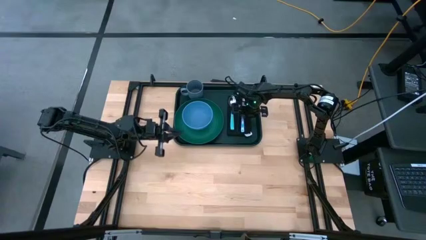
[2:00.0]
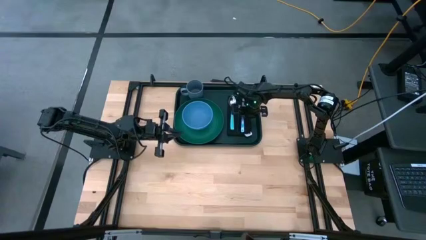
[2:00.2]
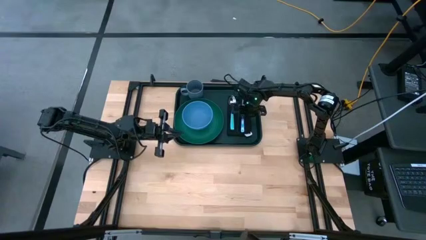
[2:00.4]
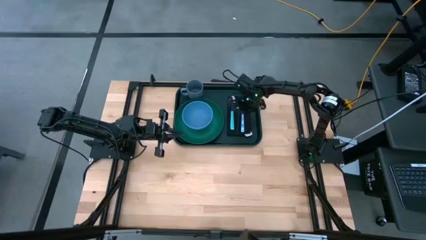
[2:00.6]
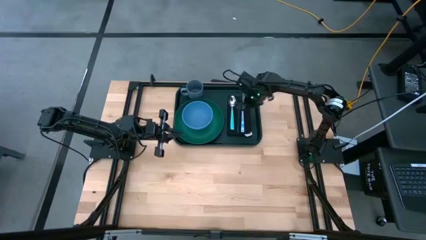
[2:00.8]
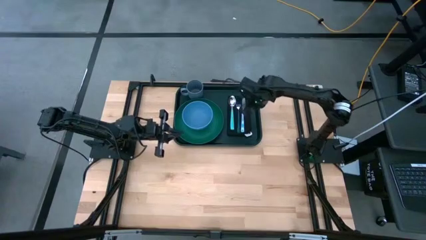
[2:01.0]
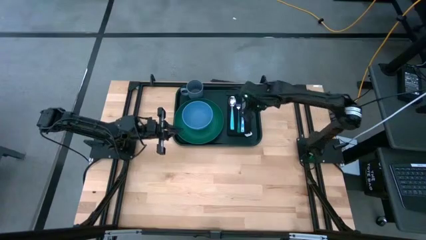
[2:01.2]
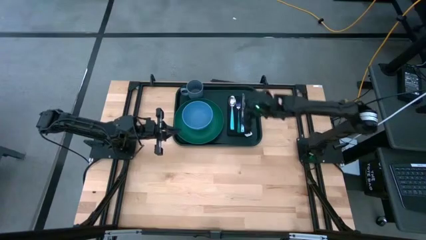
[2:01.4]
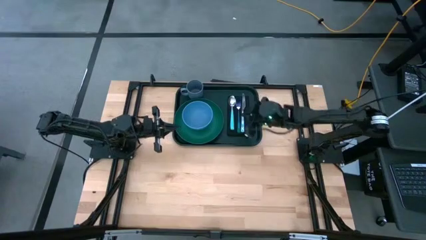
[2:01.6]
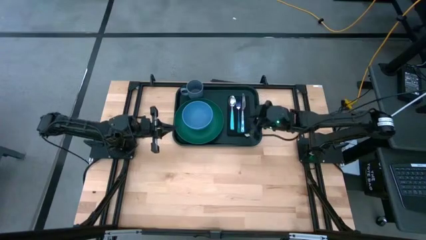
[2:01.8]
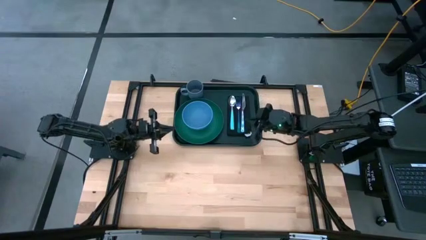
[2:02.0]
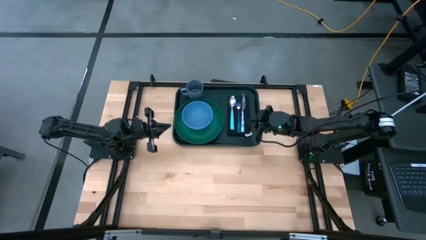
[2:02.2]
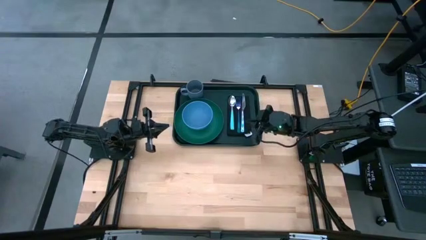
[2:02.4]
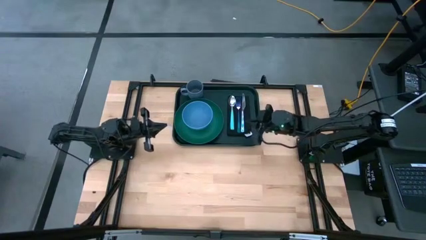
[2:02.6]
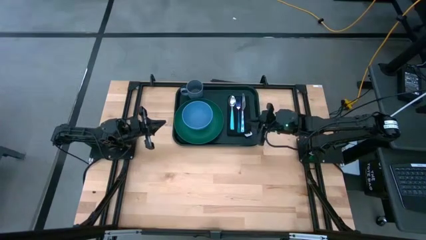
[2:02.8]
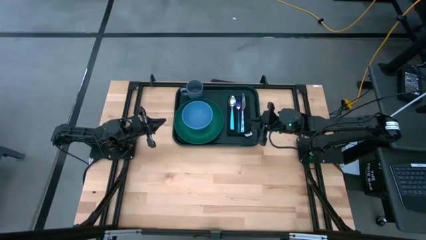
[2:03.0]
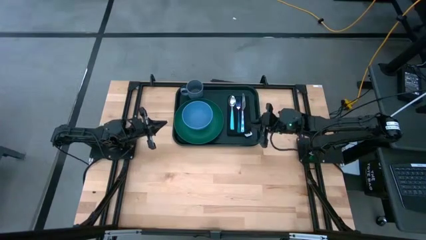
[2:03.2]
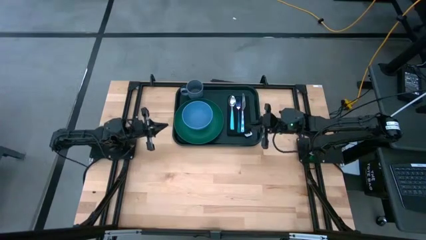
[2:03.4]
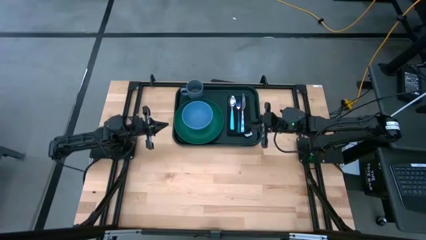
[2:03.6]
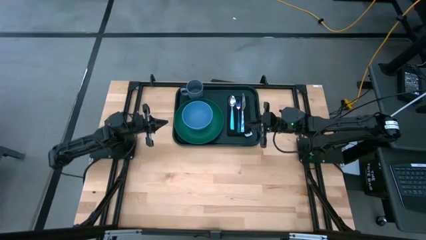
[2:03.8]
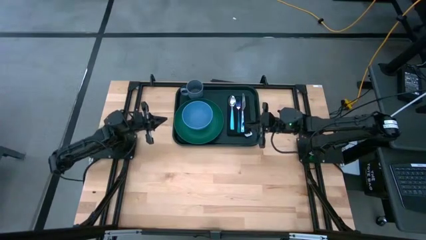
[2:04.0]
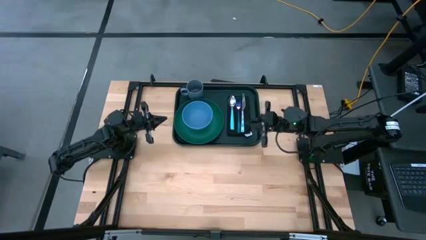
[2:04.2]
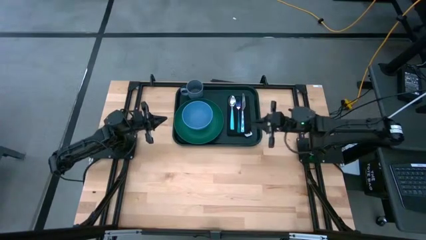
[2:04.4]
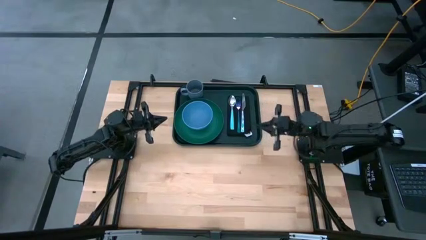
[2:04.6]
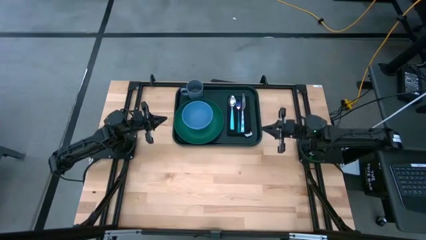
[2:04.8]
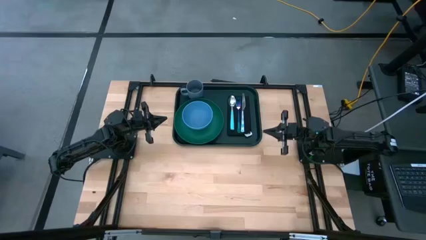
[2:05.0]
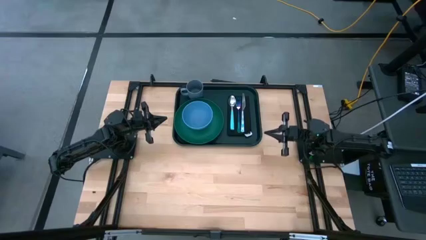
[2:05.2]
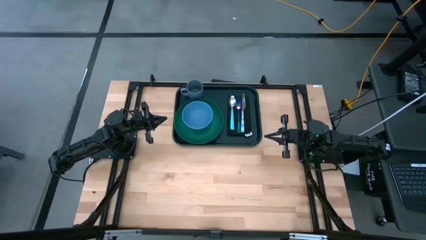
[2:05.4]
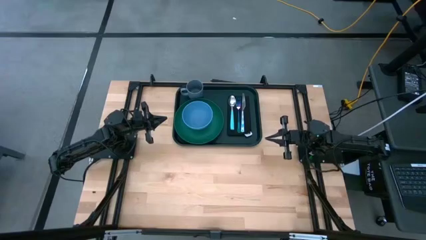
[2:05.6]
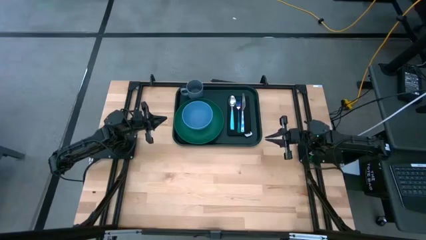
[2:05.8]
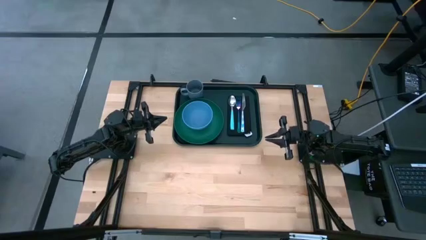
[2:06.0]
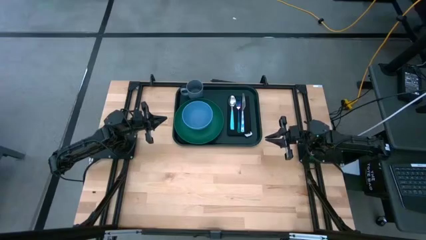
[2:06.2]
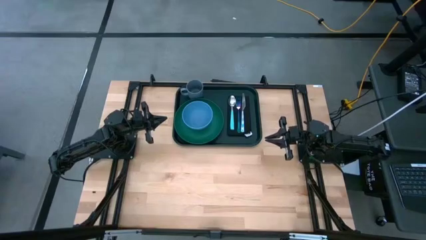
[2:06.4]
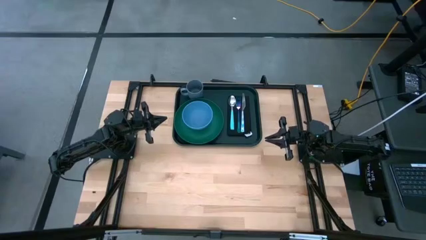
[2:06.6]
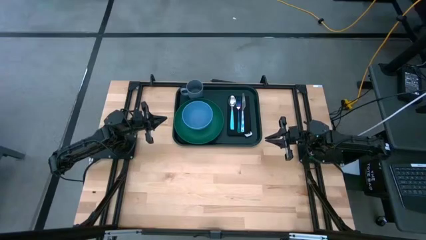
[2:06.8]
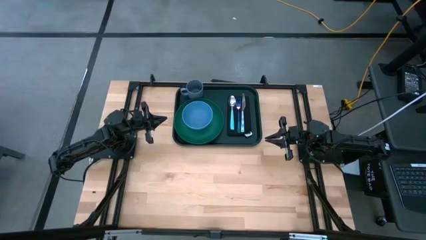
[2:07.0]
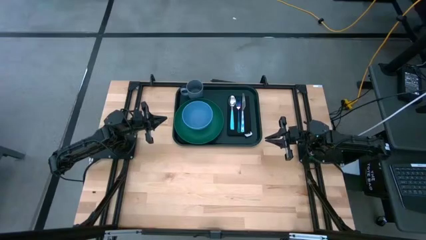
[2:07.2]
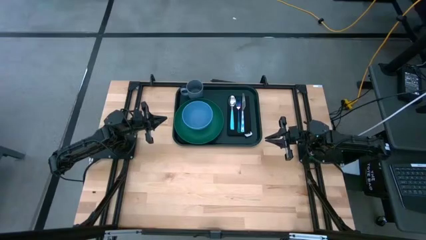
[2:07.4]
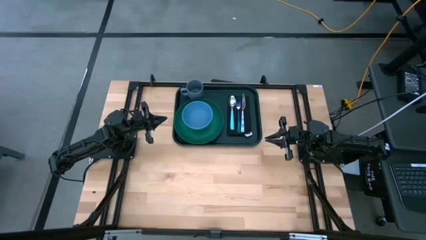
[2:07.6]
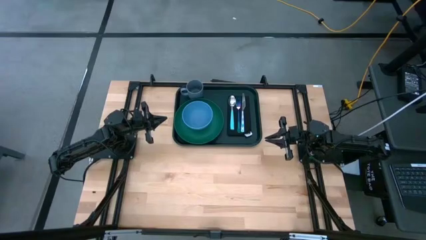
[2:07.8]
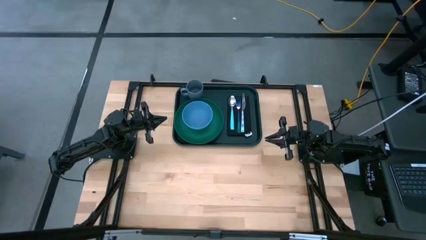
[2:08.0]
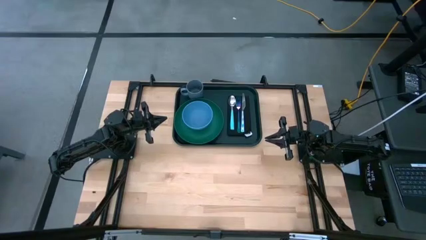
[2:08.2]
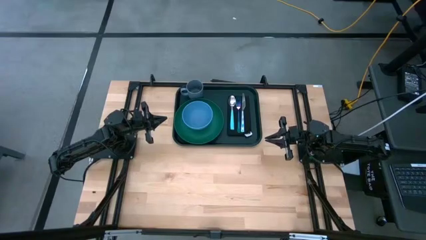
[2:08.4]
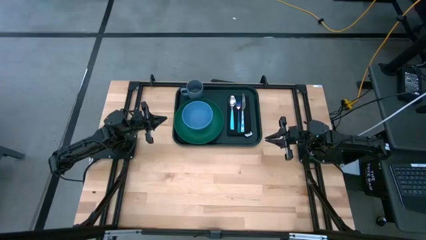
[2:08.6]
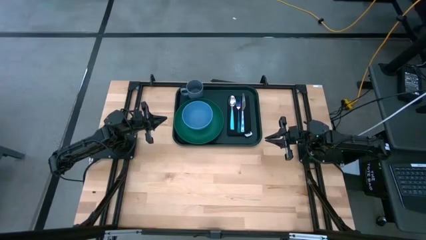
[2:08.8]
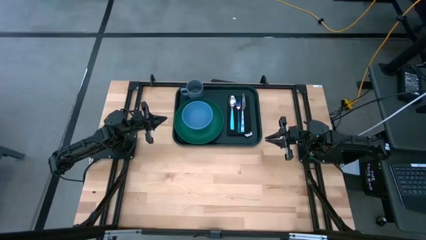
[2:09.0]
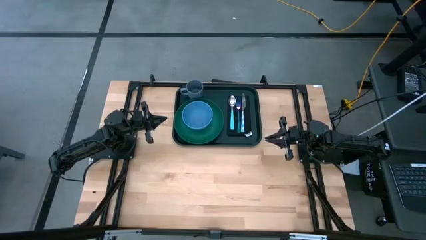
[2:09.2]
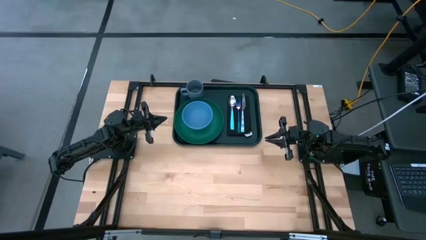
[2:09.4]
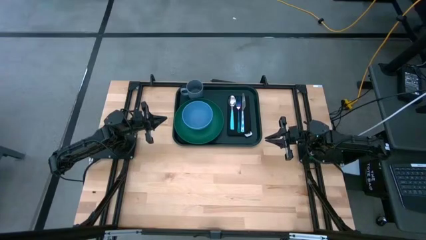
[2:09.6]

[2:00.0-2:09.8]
Task: Set up tray
Return to Home Position

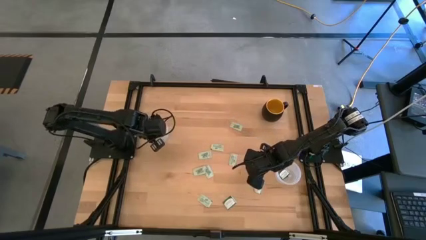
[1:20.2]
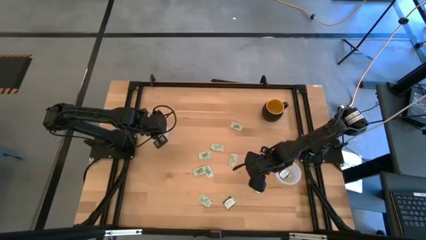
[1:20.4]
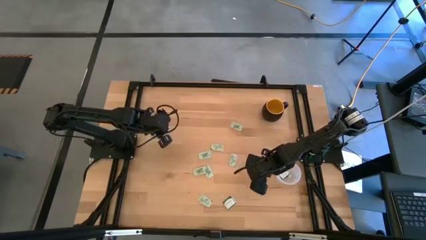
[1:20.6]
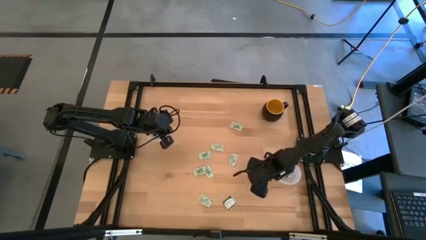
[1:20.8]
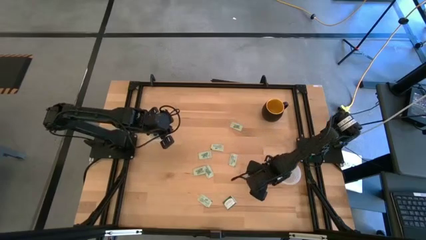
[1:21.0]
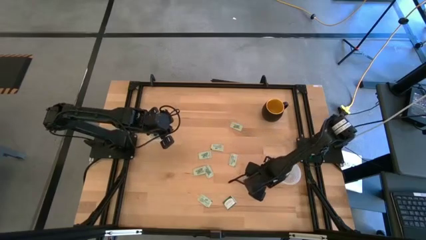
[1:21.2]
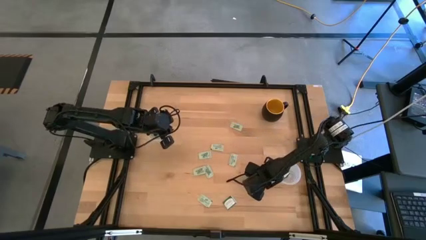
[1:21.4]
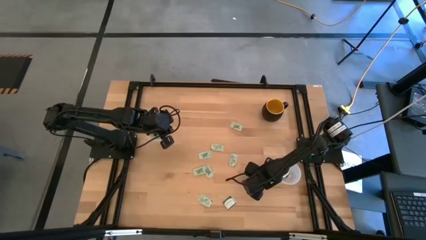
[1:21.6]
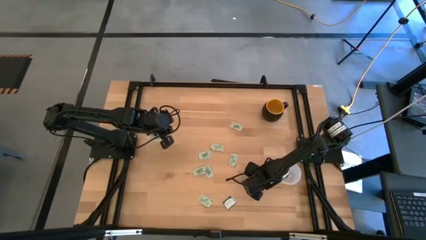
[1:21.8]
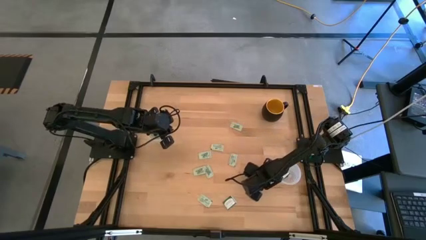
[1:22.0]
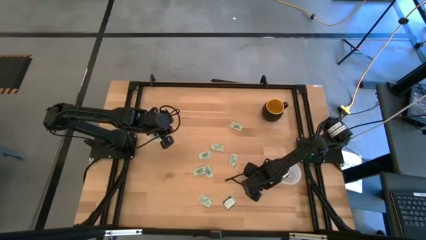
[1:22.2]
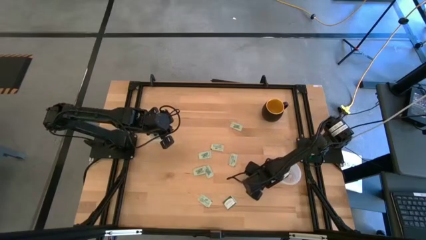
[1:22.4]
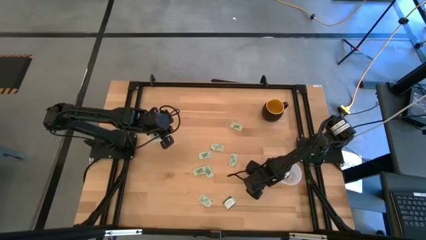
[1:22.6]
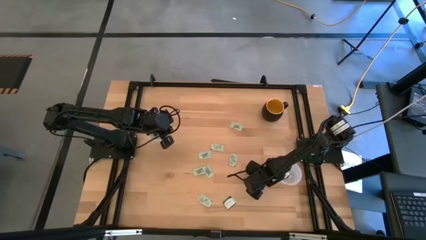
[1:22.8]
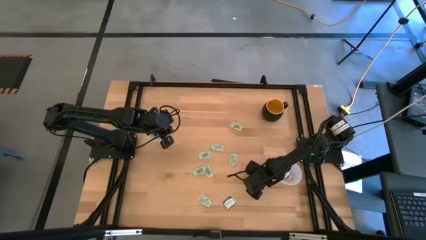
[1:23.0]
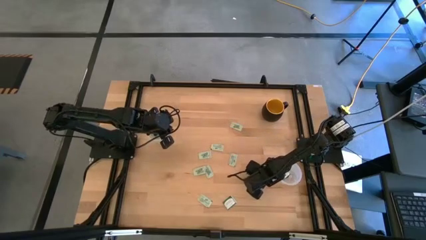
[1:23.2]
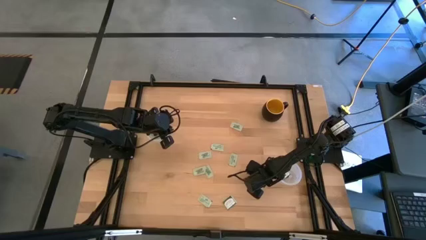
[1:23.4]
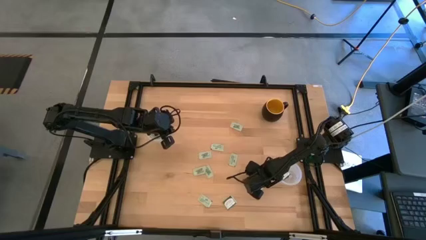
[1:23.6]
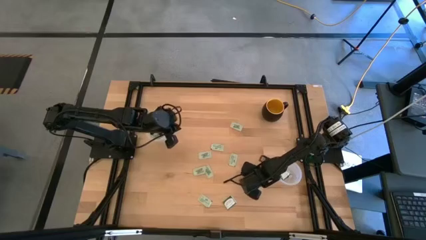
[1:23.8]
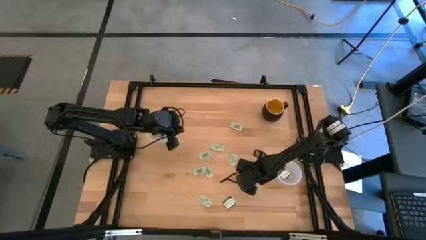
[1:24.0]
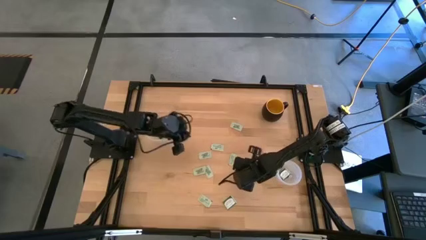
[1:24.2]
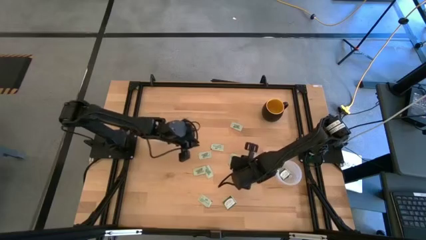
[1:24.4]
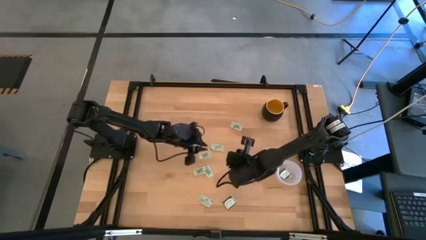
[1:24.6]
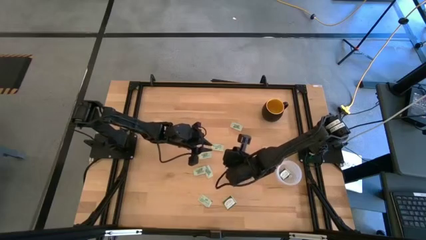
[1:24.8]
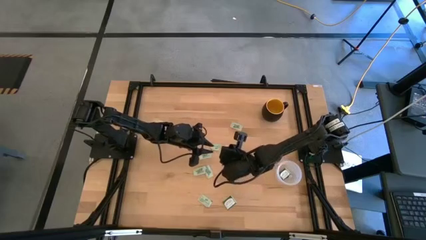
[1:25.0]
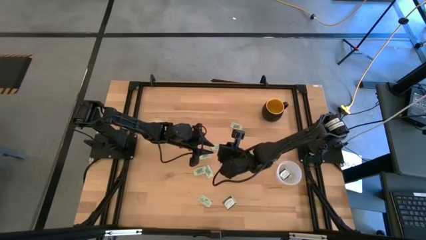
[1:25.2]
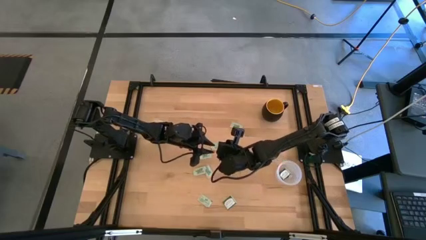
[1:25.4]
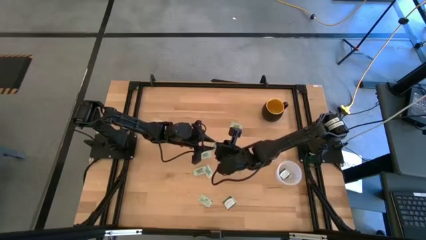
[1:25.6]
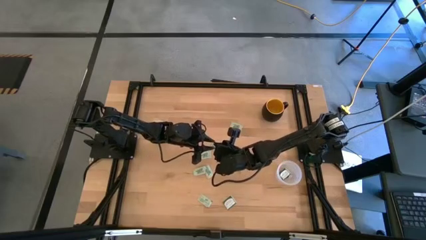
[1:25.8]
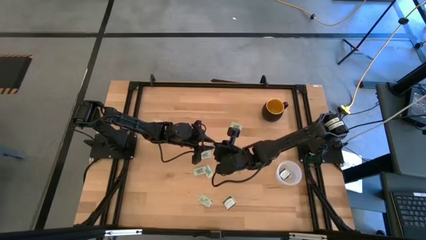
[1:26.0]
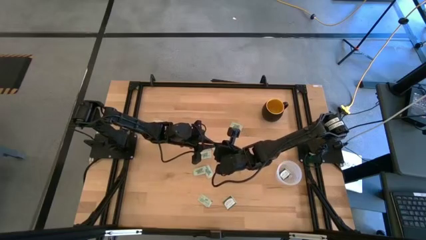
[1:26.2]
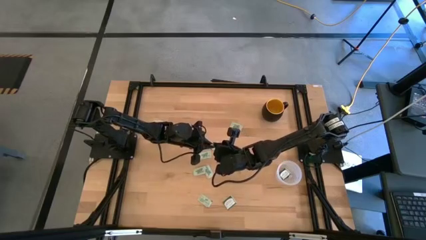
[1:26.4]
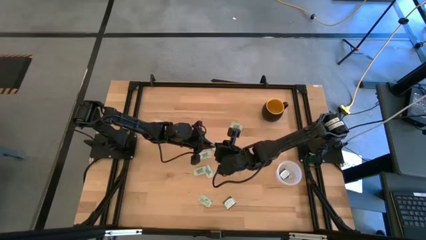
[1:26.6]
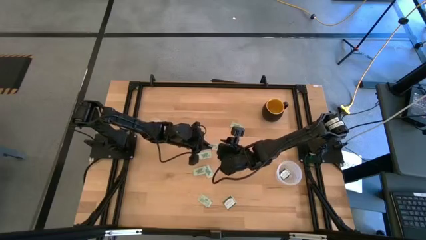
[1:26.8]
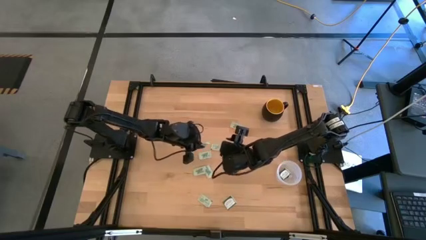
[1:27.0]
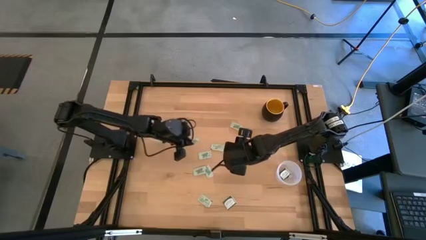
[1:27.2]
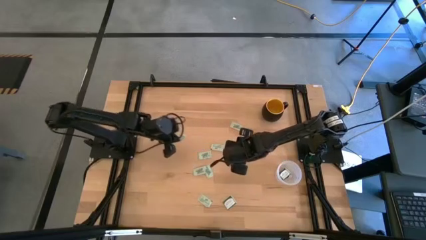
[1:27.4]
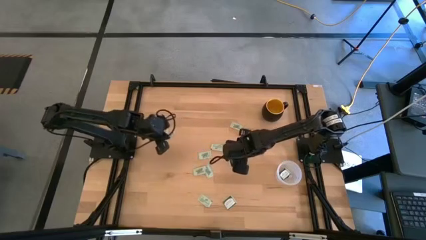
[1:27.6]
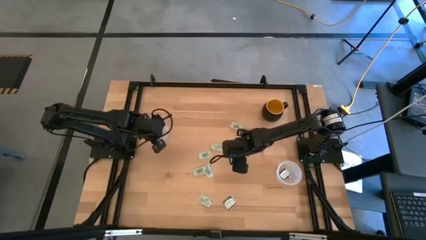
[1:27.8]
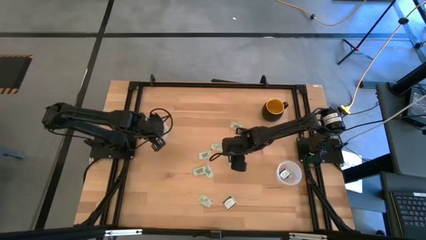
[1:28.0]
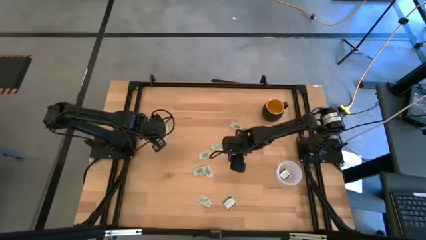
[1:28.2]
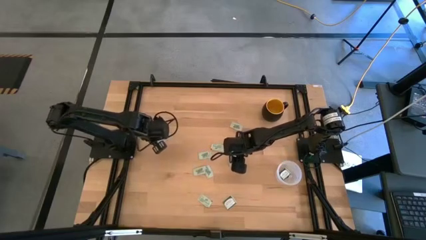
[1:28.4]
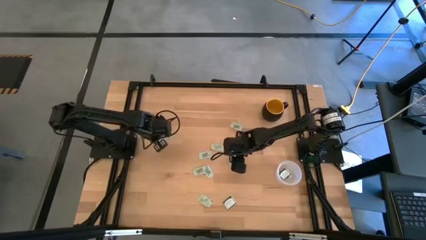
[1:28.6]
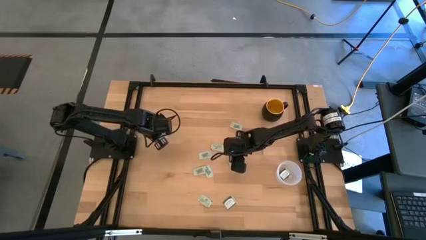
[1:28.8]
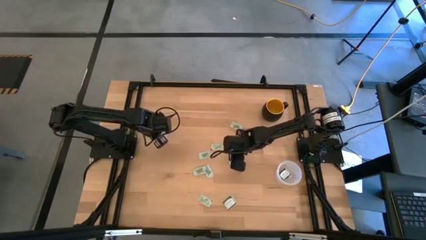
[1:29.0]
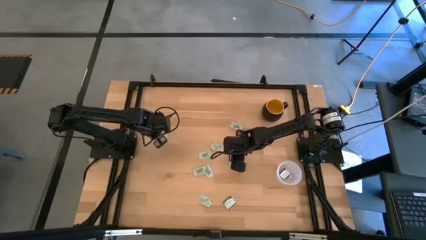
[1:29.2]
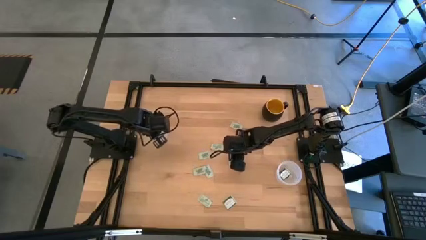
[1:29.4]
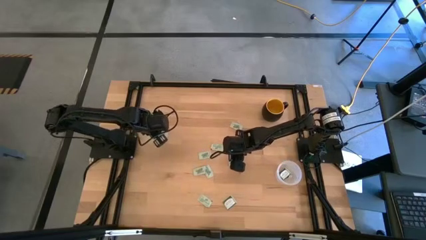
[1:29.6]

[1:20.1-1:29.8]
Task: Pick and place Stevia / Truvia into bins
Put the white stevia packet into the left transparent container
